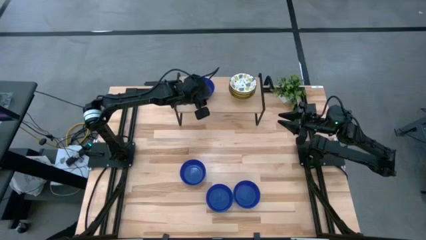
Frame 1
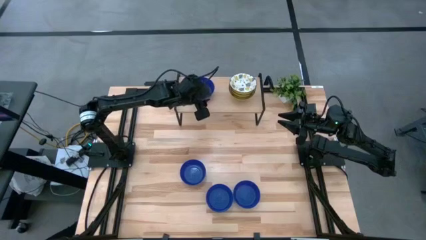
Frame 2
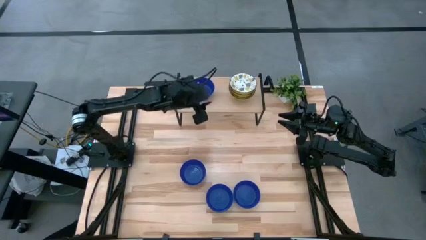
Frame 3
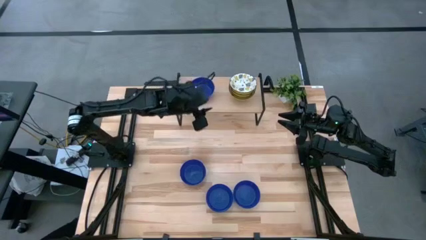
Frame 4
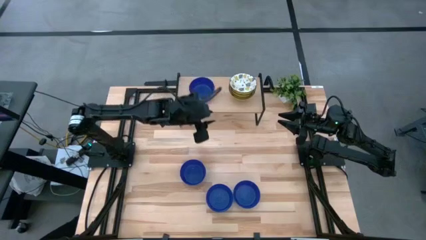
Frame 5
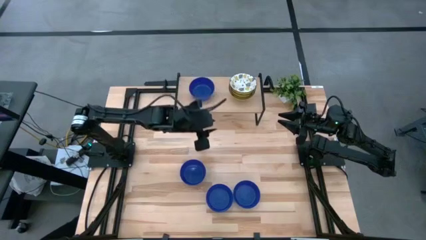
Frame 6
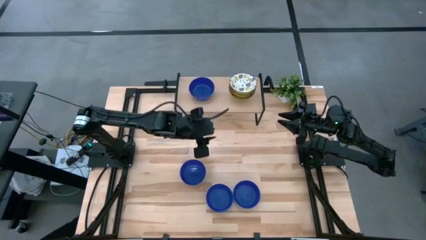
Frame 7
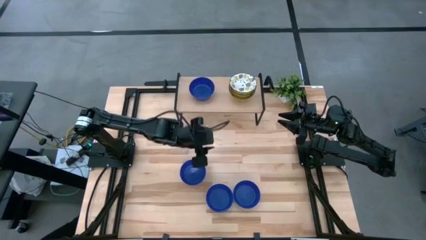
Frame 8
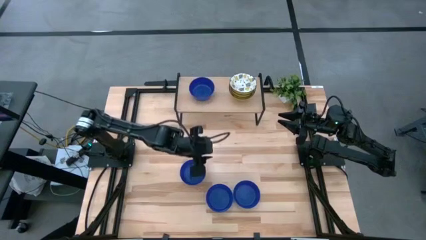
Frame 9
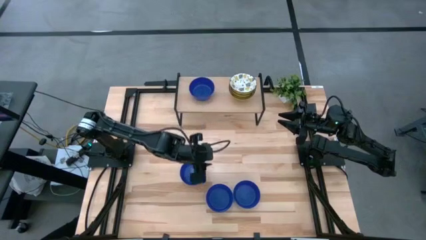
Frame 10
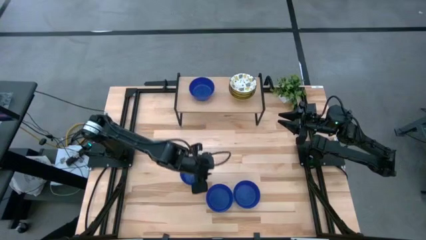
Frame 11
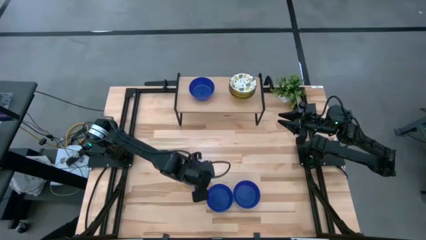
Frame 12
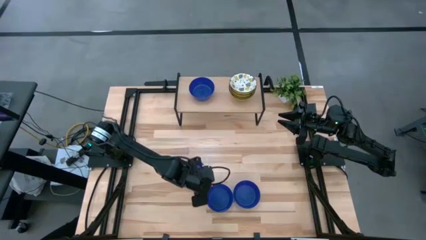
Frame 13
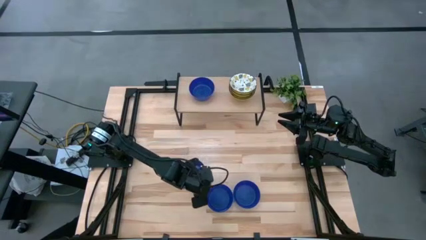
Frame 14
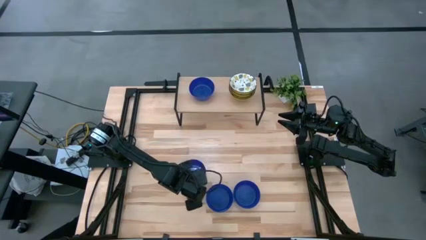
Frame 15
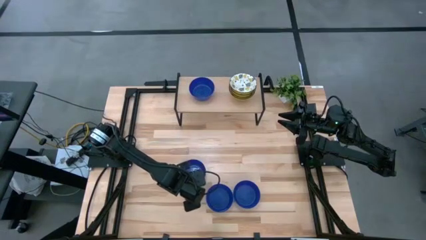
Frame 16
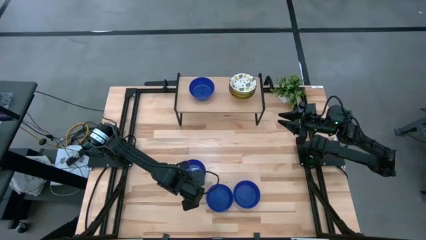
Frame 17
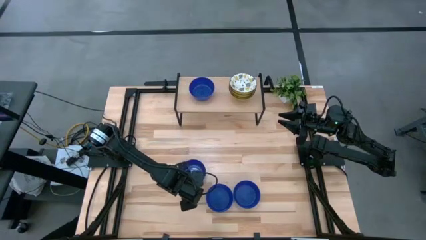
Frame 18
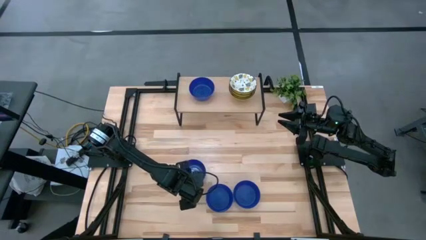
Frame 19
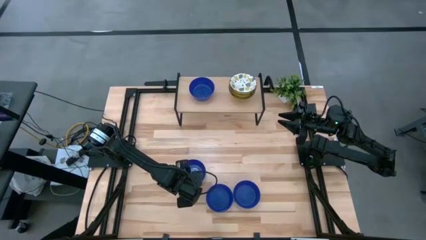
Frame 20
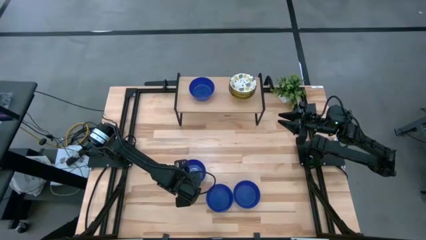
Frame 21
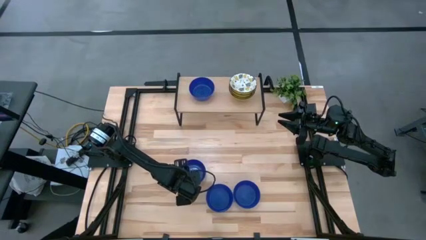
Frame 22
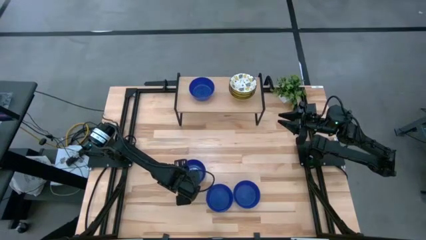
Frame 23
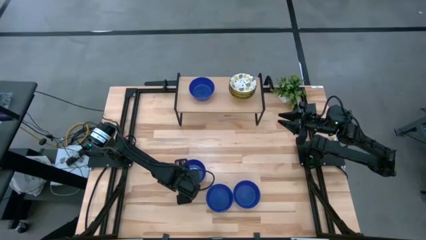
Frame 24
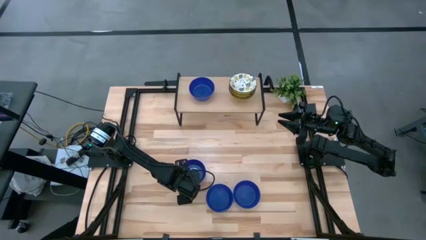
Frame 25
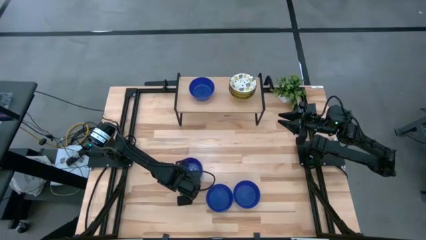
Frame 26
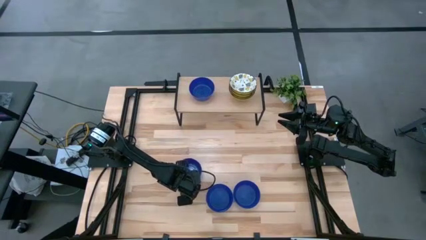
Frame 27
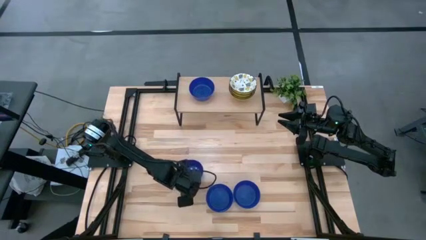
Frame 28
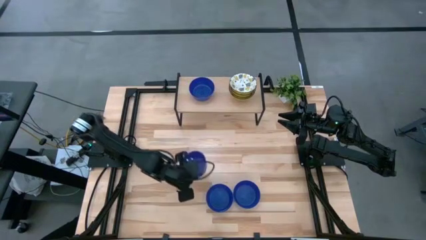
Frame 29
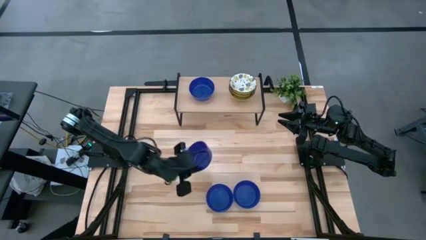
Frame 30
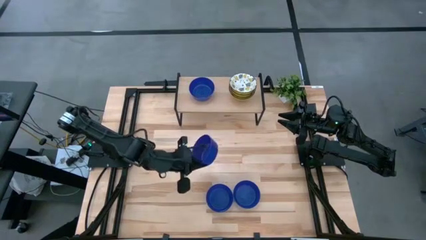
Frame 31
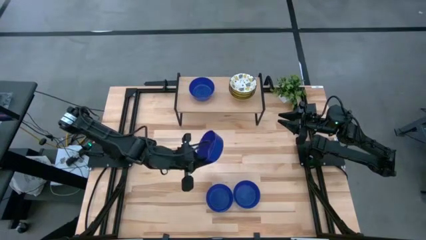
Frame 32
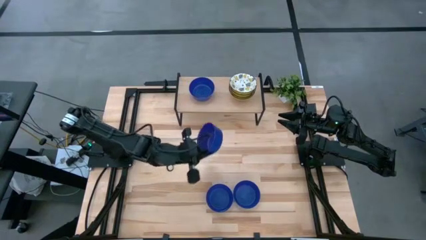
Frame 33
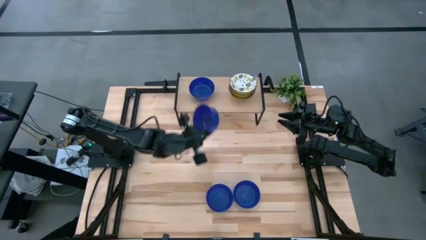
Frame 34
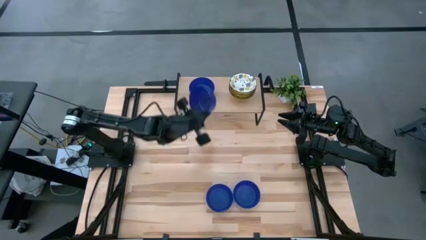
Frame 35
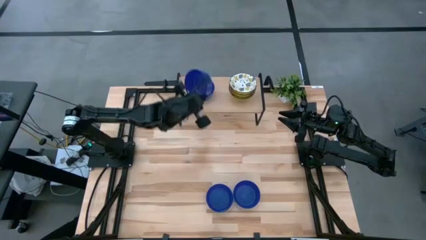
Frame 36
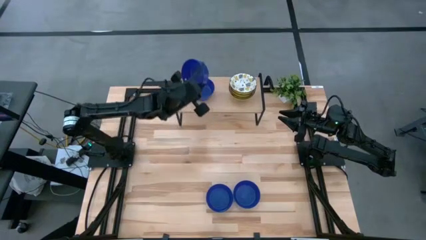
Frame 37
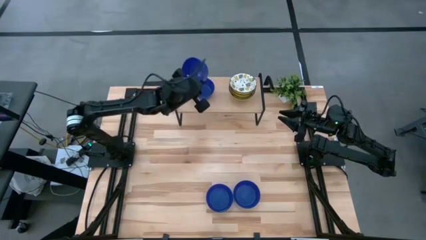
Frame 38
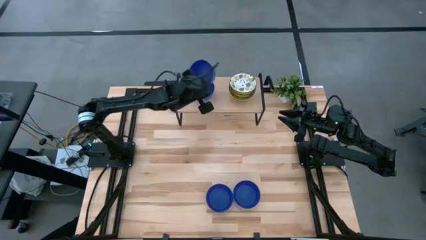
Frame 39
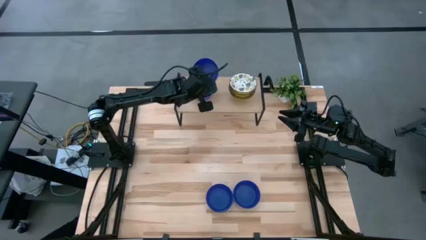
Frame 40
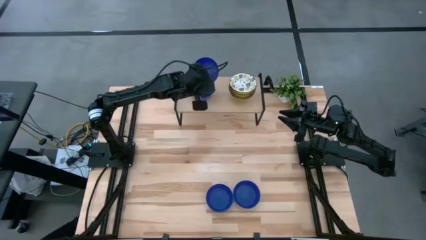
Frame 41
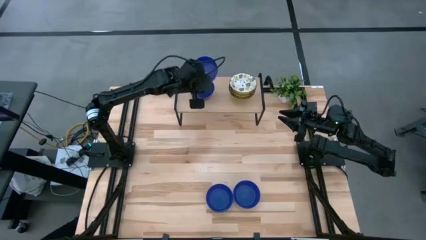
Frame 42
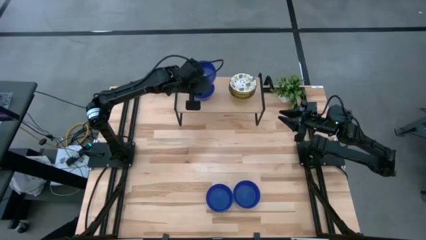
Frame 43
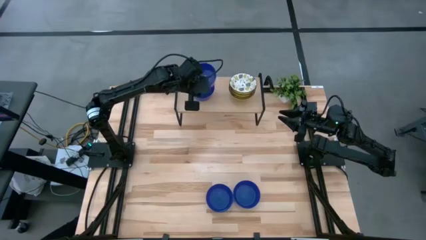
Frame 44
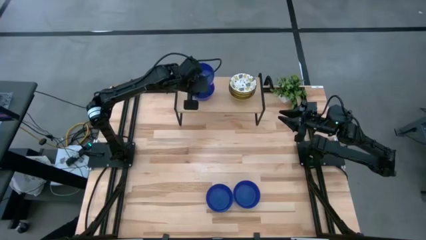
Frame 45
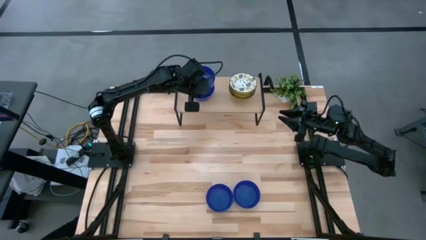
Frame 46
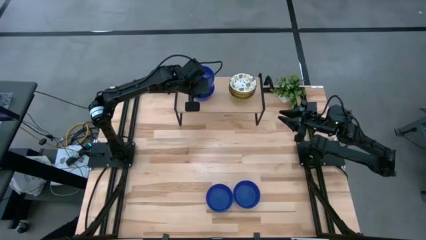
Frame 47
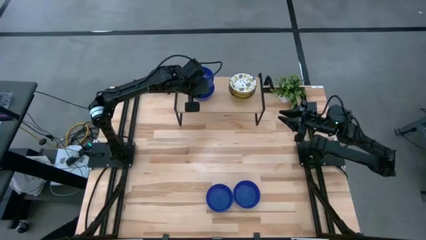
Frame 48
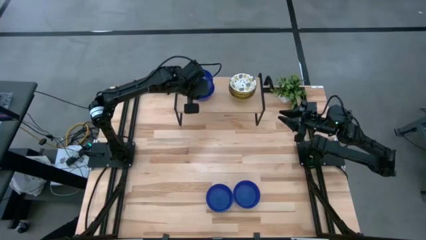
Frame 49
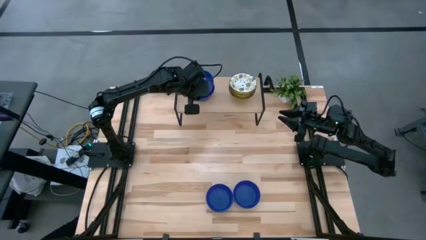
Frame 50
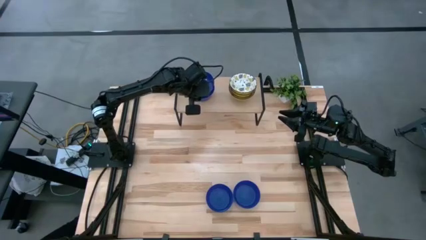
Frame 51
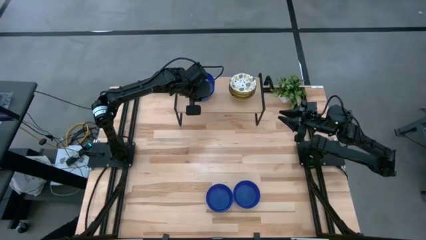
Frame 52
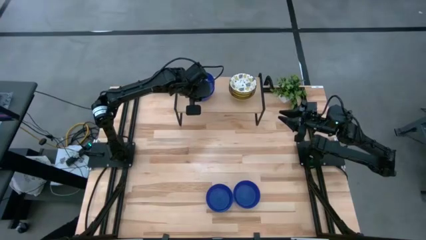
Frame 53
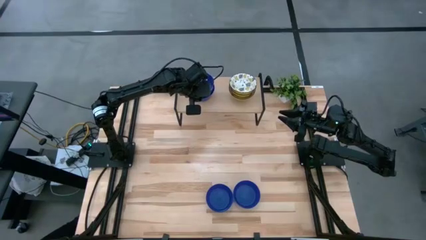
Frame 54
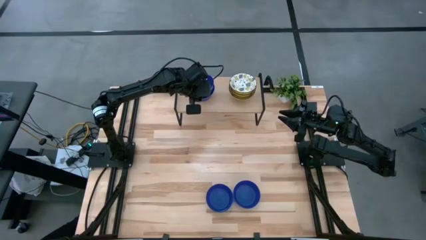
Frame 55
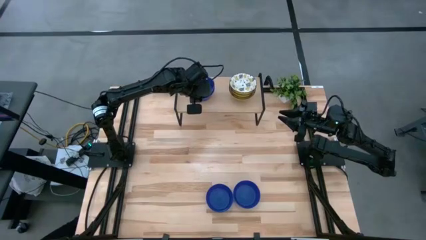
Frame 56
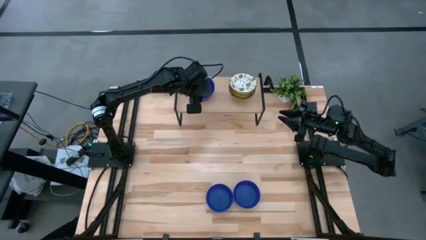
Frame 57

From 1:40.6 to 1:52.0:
Task: Pick & Place Mini bowls
Stack the blue bowl on top of the blue bowl on the shelf

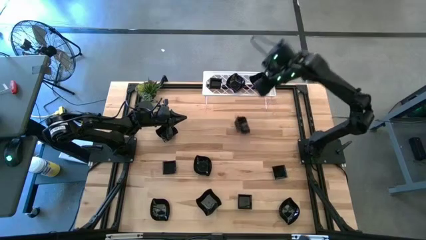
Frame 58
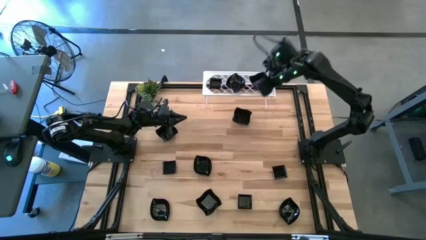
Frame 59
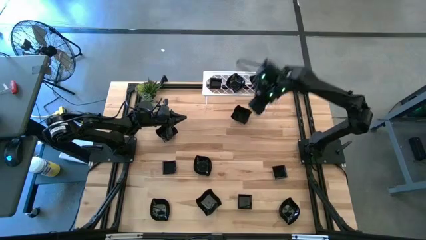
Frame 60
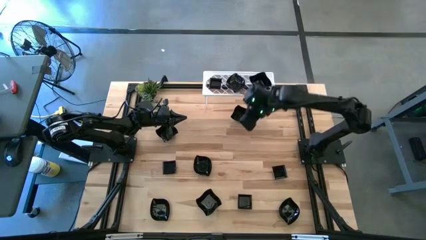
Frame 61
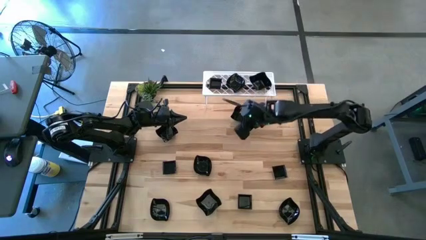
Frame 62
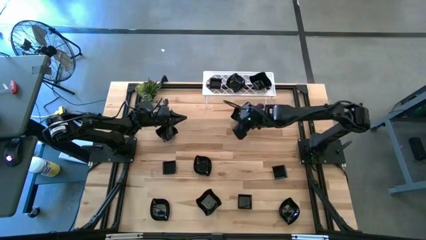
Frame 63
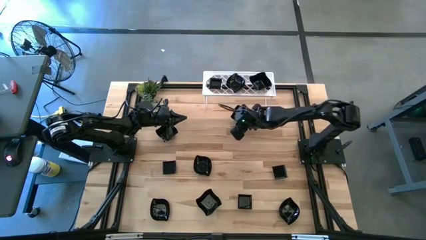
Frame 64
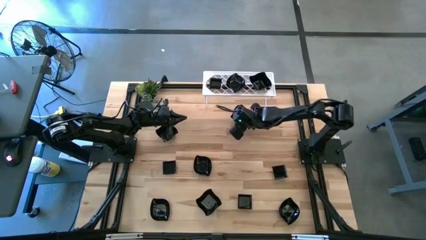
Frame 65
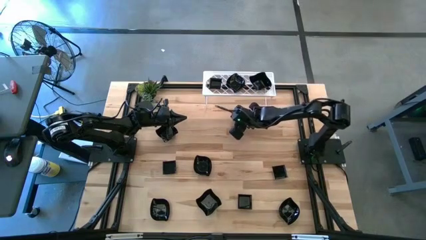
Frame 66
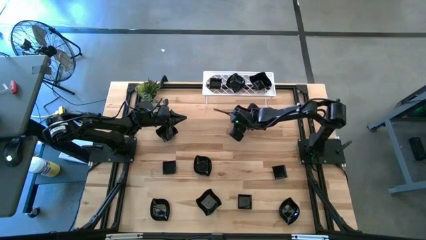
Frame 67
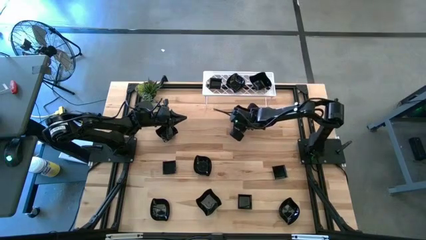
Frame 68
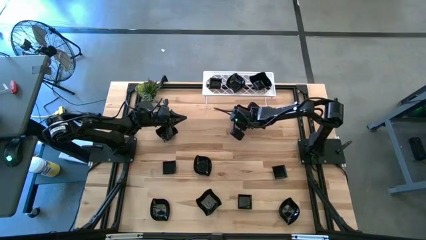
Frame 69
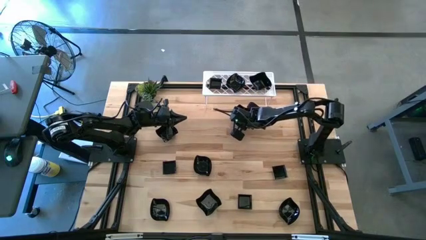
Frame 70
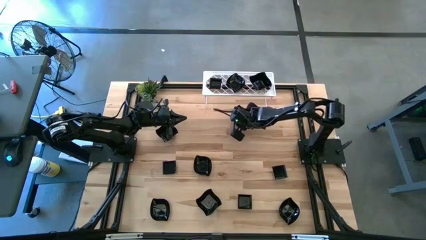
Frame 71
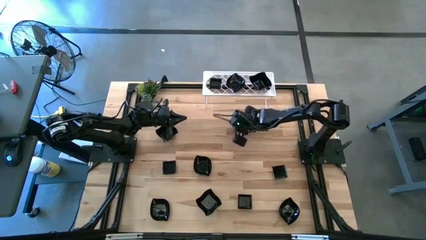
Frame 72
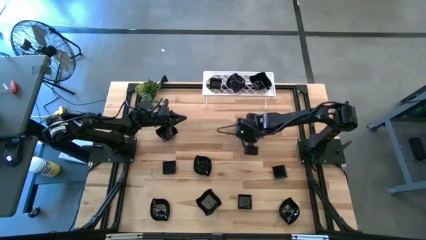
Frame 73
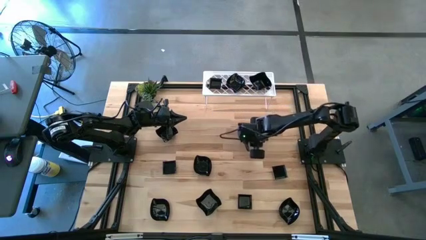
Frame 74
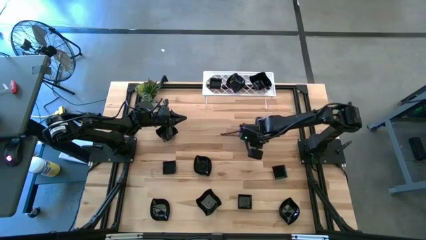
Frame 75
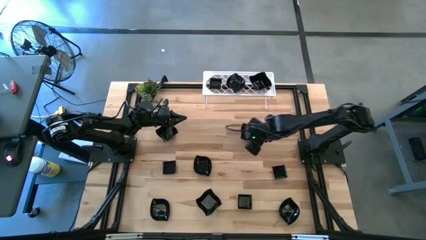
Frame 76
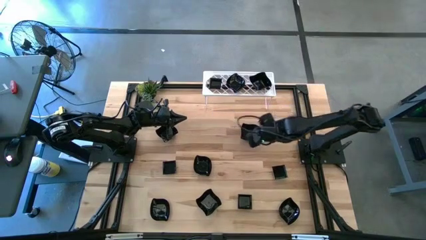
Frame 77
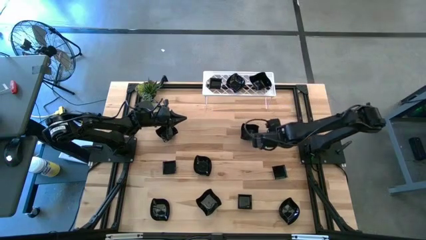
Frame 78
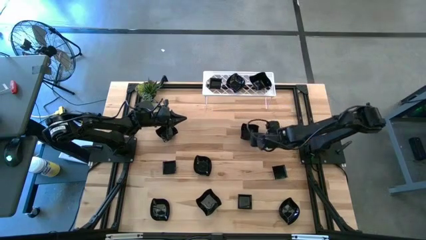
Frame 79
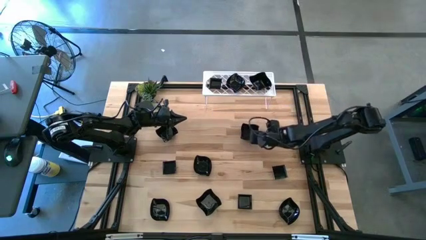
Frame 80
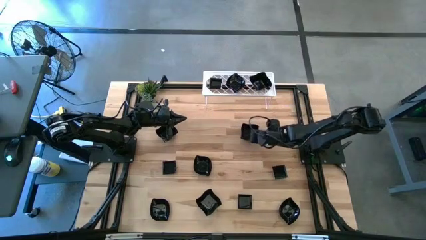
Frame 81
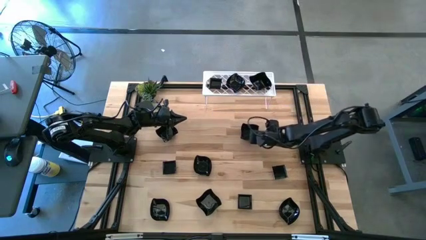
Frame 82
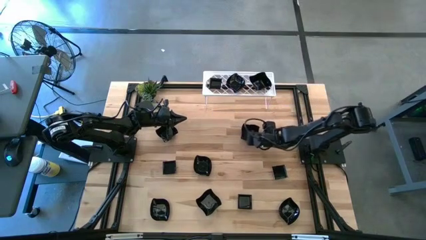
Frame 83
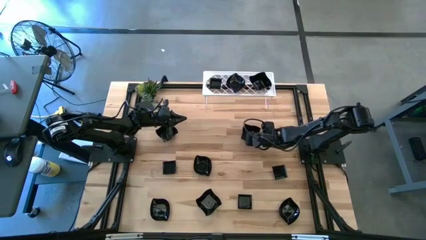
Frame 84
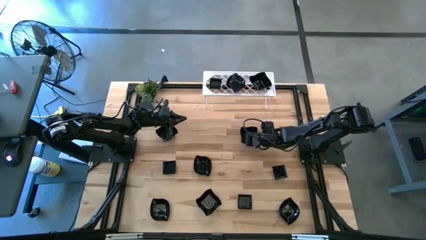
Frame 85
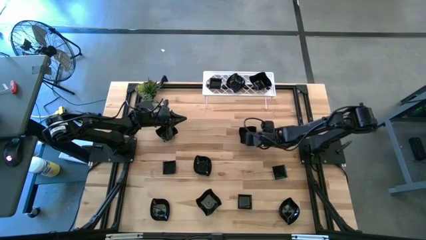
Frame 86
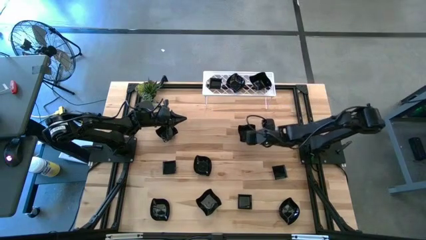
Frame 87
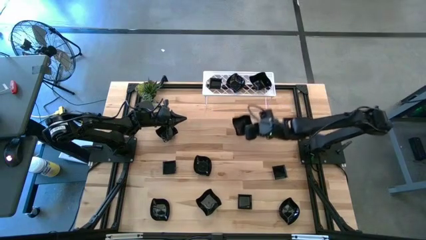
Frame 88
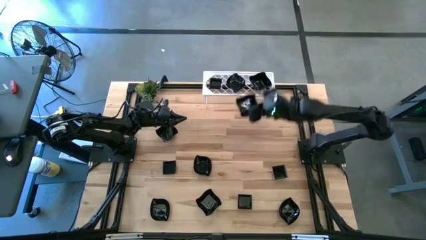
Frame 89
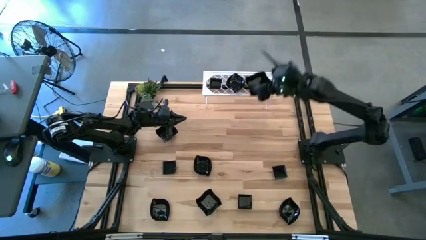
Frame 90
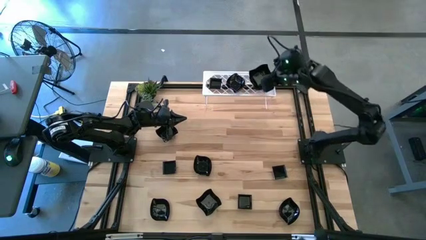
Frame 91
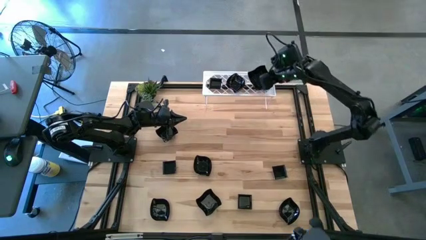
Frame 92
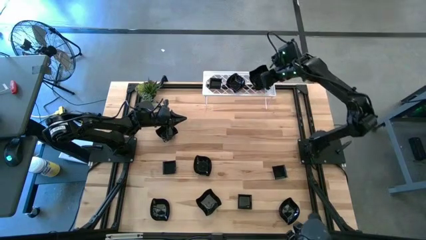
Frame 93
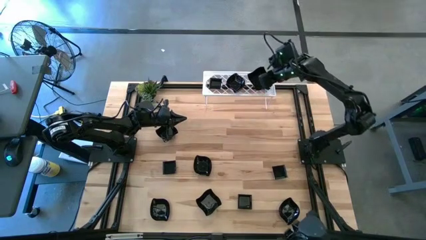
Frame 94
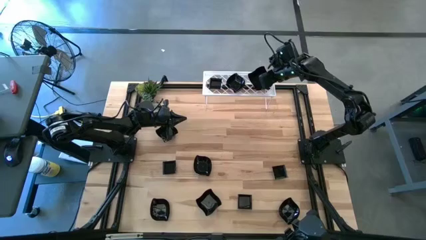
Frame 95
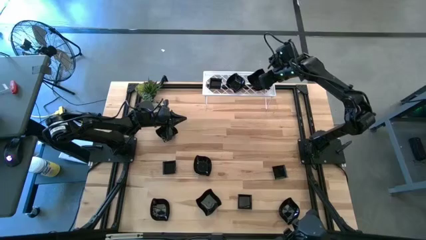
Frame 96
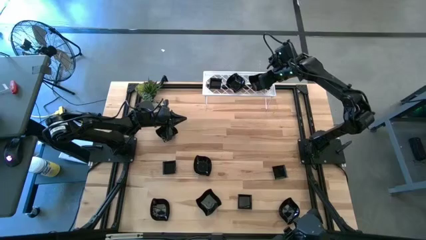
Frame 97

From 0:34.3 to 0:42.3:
Task: Pick & Place Mini shaped plates
Stack the distorted square plate on top of the distorted square plate on the shelf
